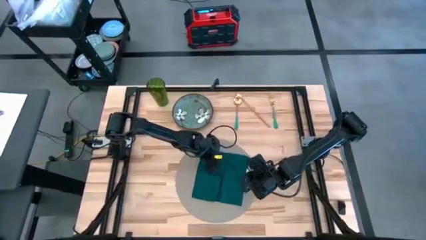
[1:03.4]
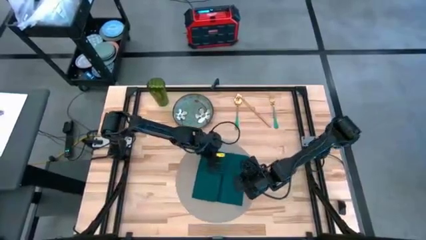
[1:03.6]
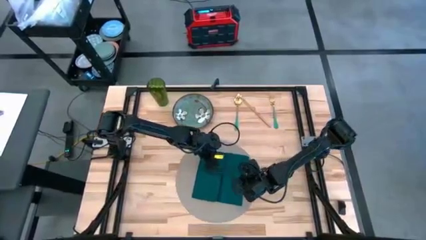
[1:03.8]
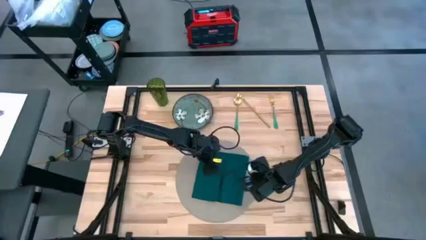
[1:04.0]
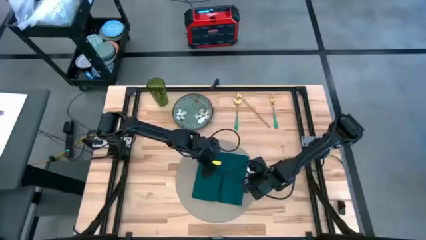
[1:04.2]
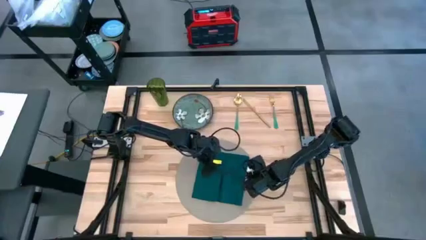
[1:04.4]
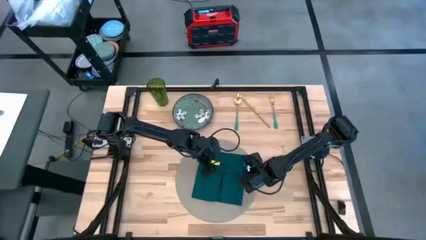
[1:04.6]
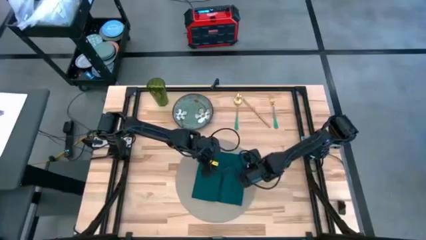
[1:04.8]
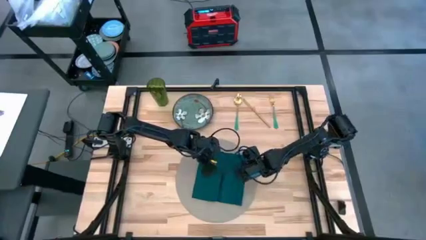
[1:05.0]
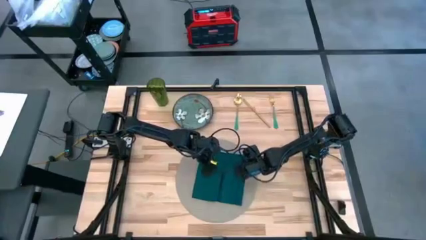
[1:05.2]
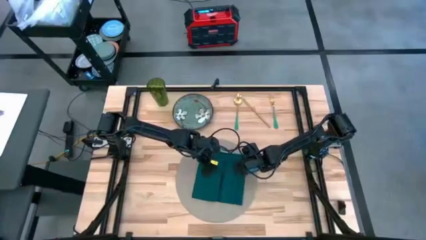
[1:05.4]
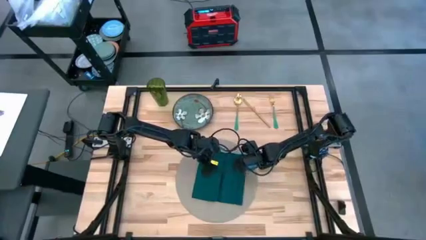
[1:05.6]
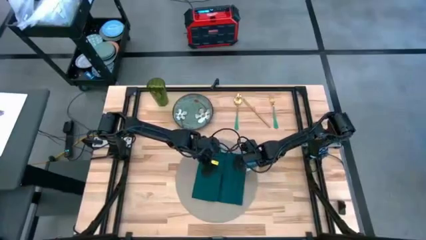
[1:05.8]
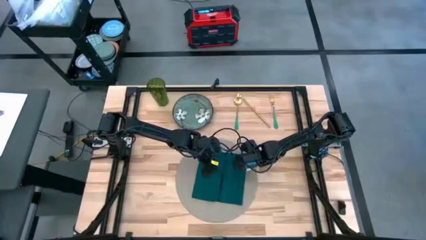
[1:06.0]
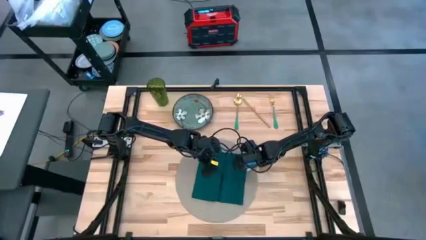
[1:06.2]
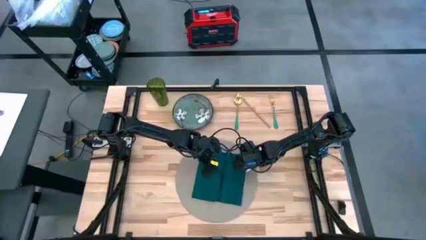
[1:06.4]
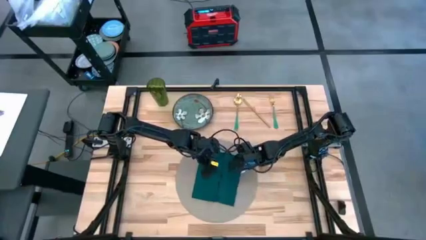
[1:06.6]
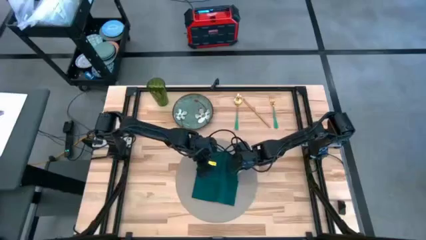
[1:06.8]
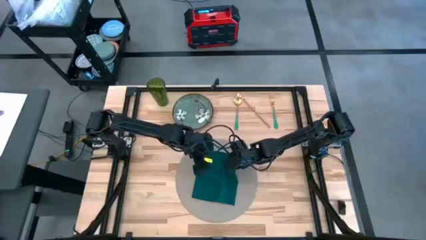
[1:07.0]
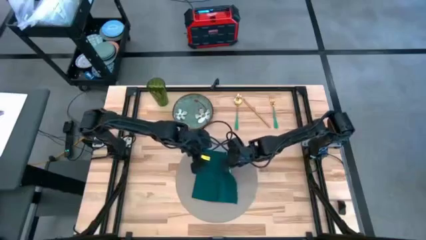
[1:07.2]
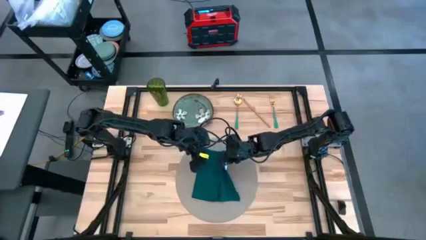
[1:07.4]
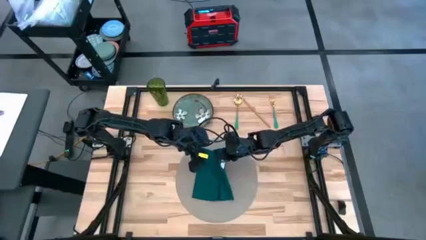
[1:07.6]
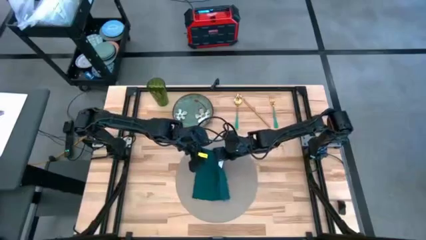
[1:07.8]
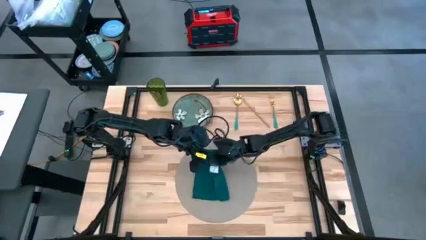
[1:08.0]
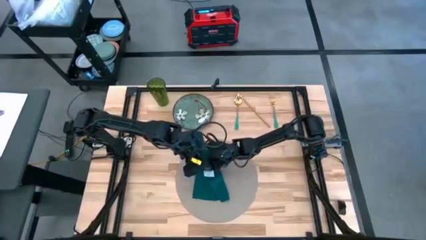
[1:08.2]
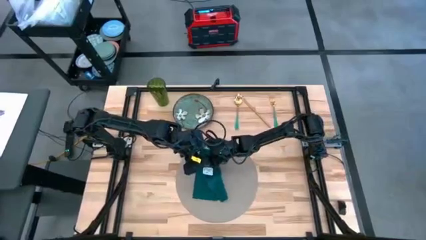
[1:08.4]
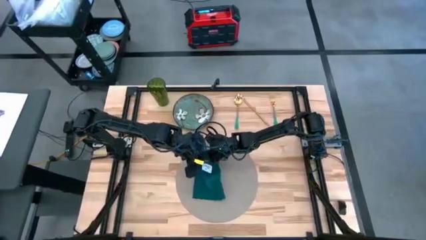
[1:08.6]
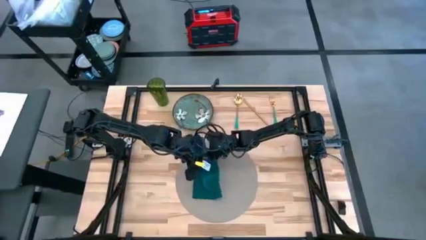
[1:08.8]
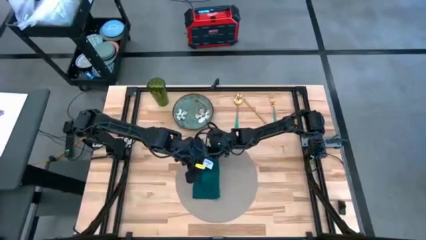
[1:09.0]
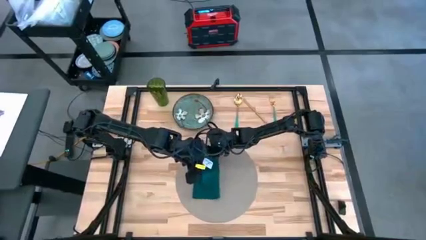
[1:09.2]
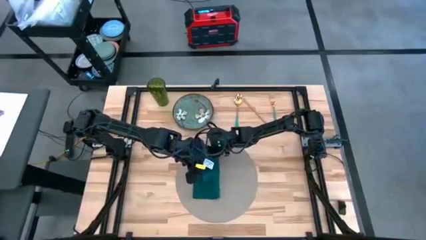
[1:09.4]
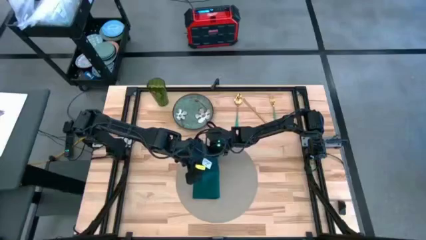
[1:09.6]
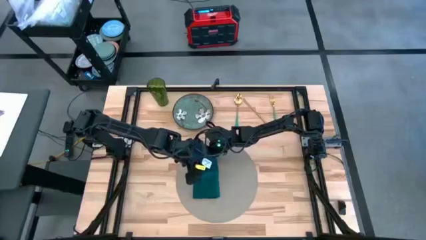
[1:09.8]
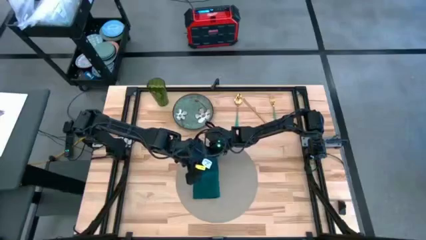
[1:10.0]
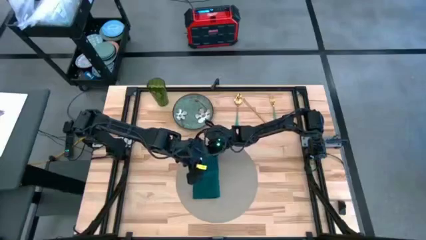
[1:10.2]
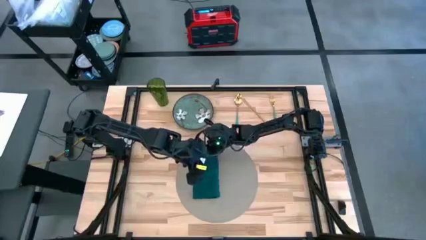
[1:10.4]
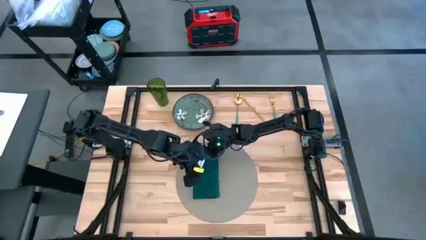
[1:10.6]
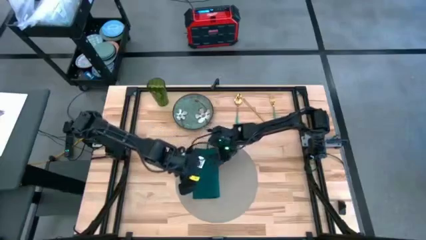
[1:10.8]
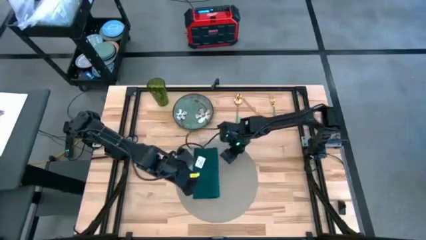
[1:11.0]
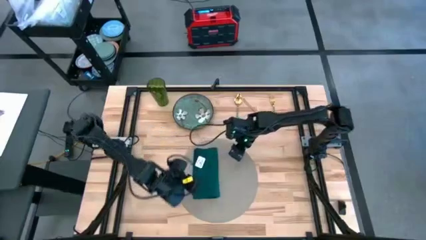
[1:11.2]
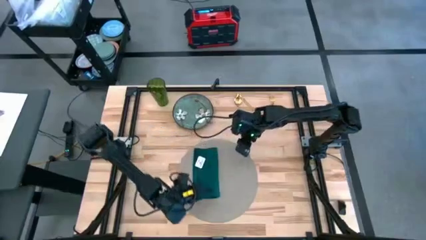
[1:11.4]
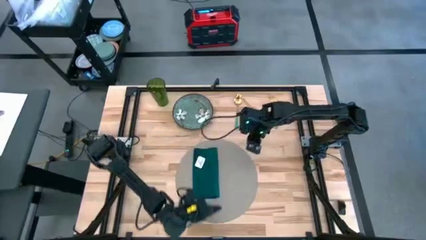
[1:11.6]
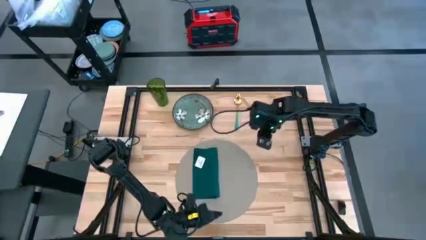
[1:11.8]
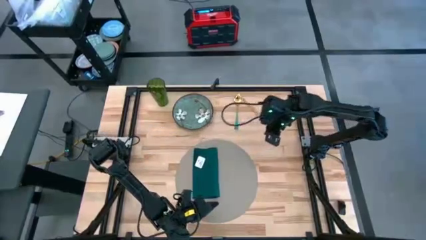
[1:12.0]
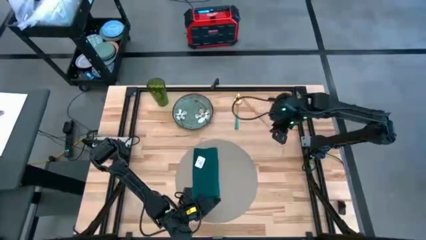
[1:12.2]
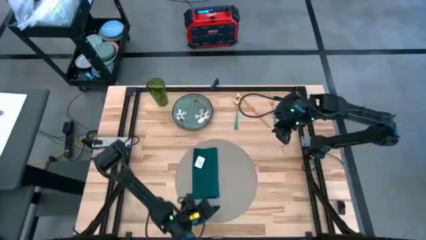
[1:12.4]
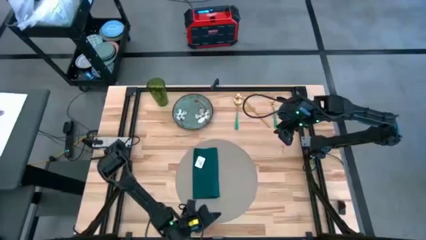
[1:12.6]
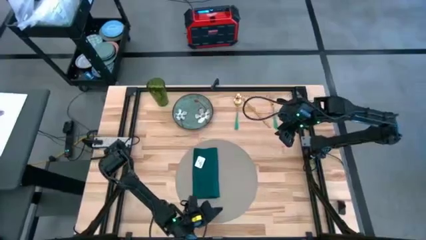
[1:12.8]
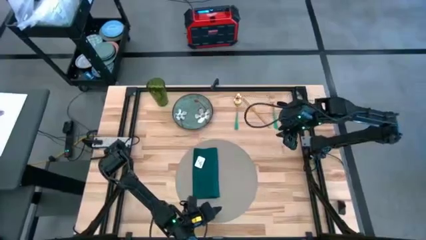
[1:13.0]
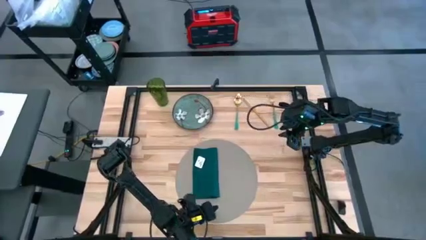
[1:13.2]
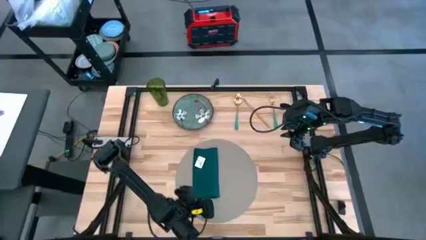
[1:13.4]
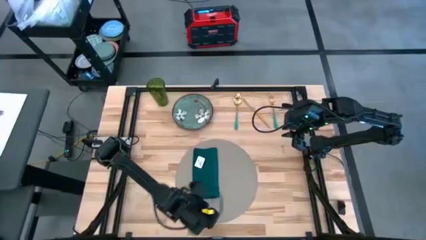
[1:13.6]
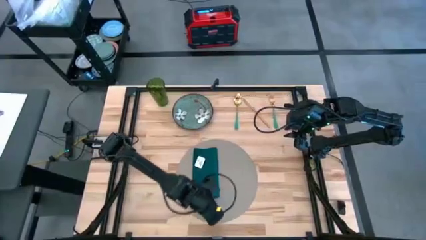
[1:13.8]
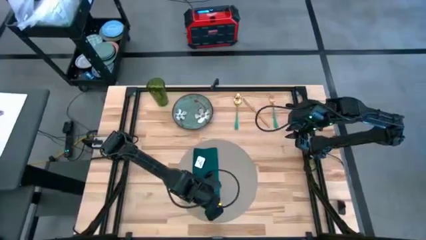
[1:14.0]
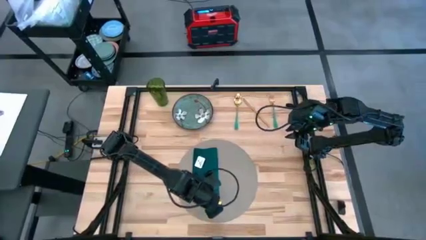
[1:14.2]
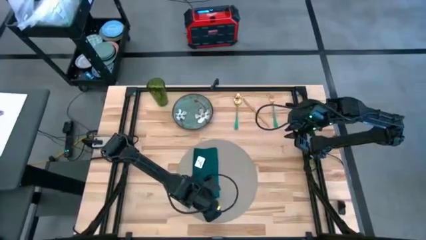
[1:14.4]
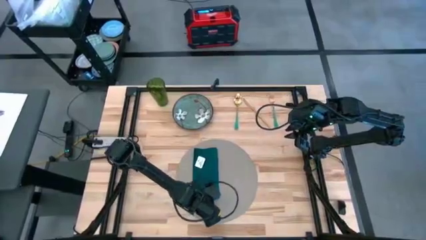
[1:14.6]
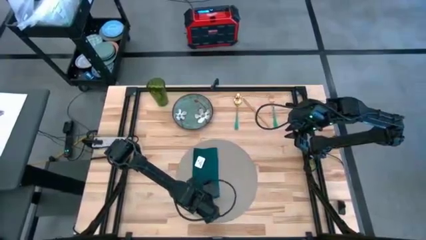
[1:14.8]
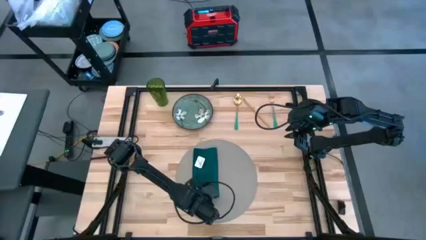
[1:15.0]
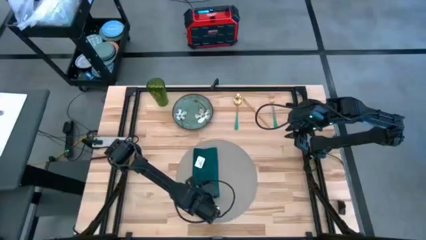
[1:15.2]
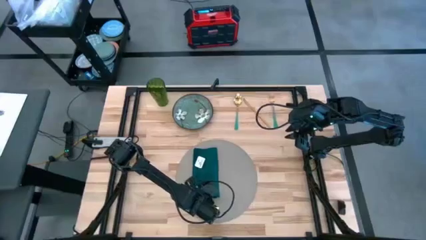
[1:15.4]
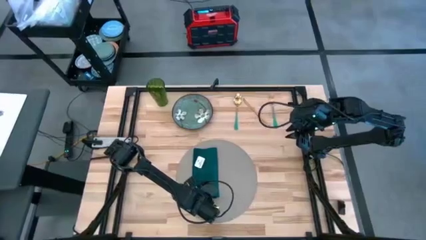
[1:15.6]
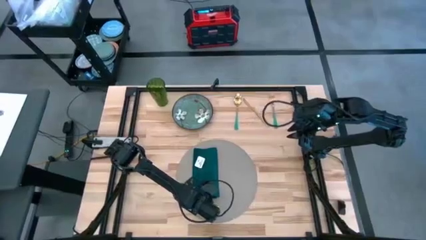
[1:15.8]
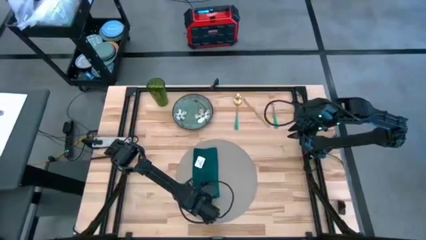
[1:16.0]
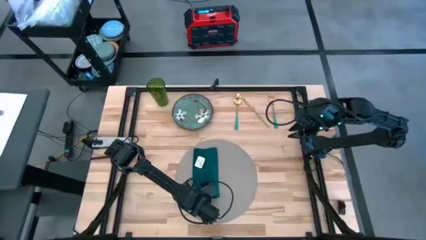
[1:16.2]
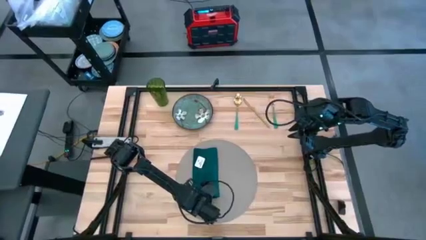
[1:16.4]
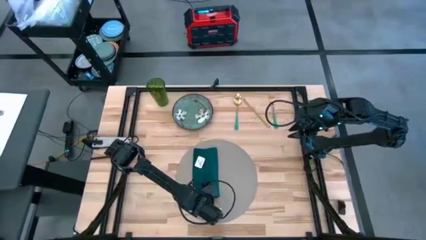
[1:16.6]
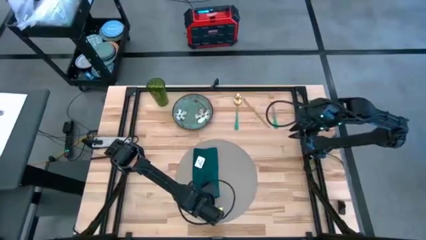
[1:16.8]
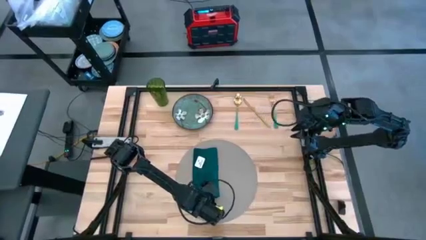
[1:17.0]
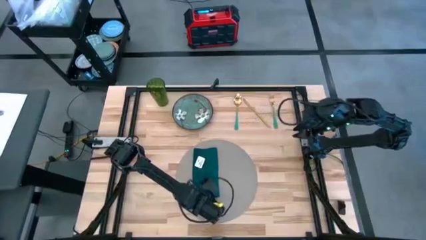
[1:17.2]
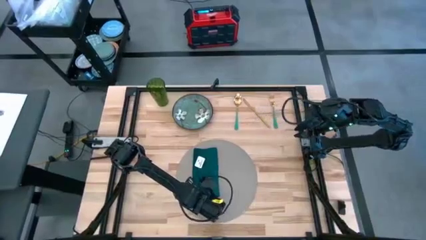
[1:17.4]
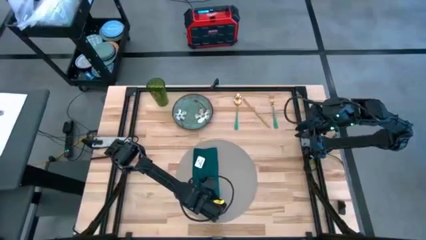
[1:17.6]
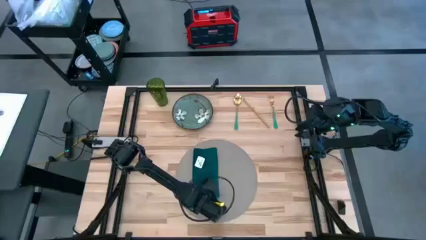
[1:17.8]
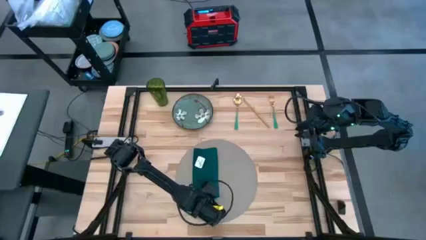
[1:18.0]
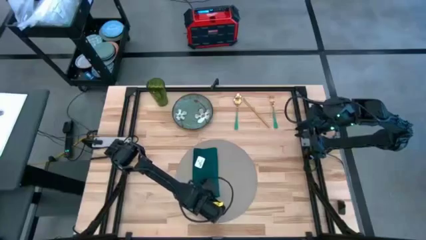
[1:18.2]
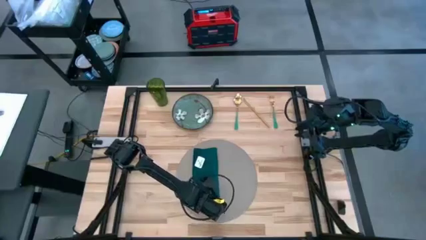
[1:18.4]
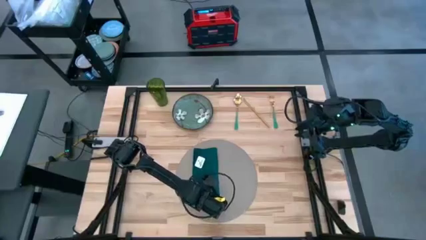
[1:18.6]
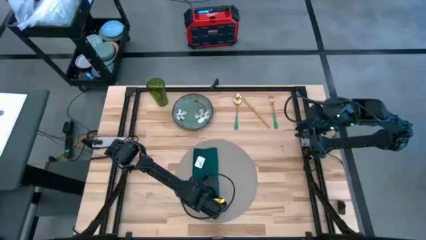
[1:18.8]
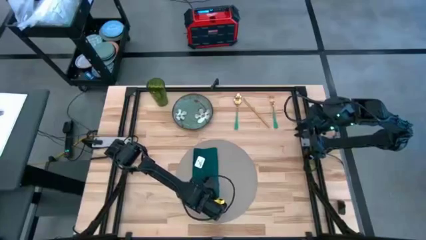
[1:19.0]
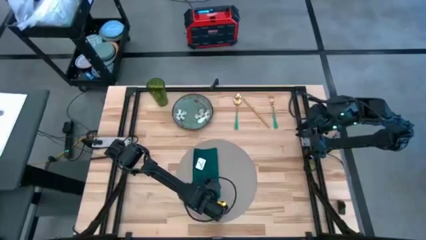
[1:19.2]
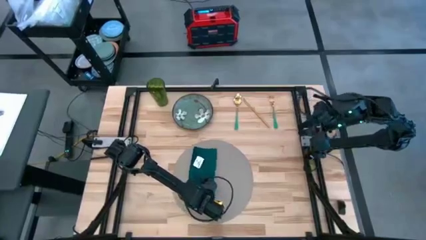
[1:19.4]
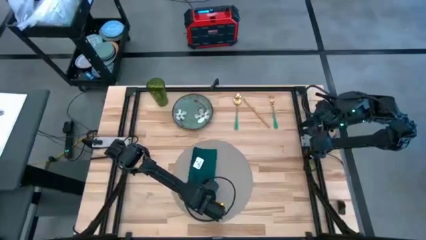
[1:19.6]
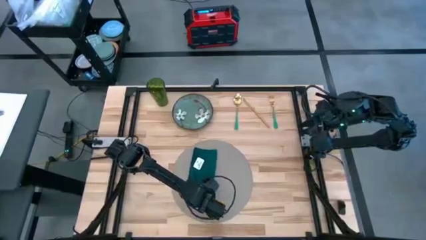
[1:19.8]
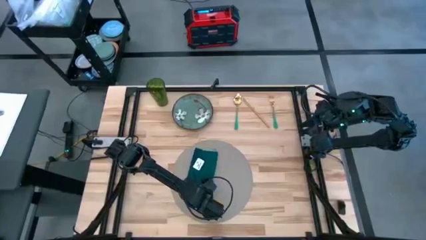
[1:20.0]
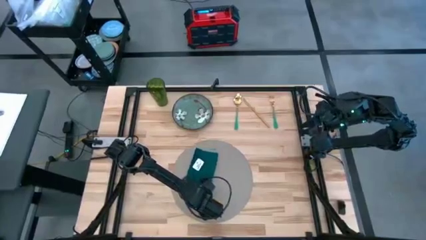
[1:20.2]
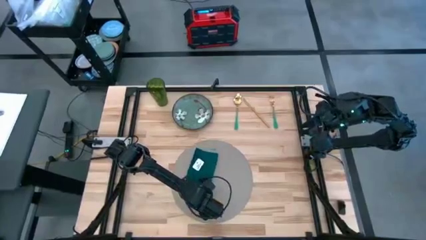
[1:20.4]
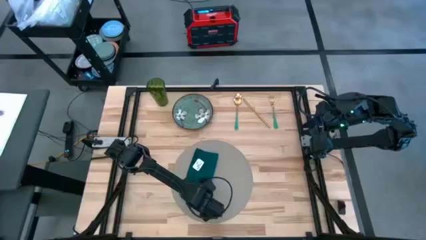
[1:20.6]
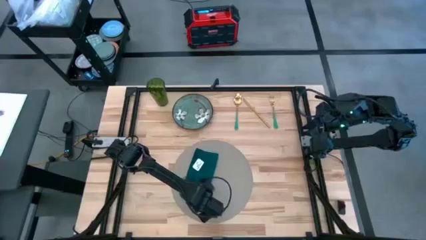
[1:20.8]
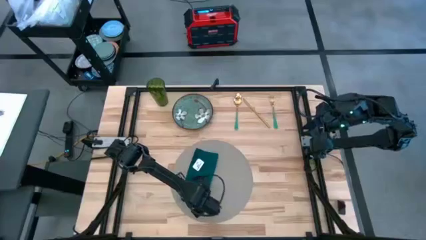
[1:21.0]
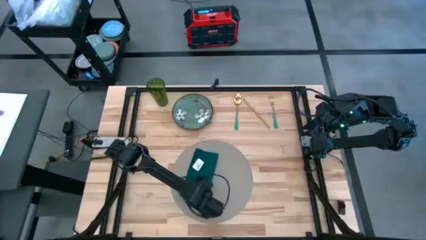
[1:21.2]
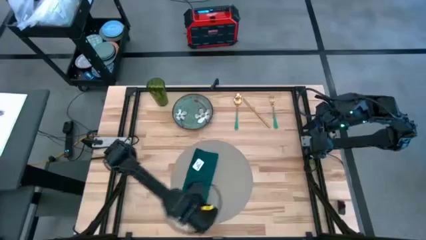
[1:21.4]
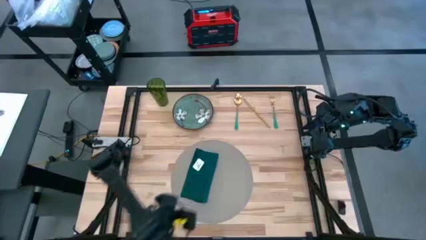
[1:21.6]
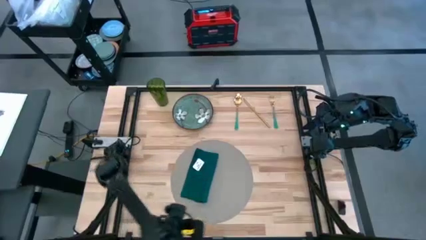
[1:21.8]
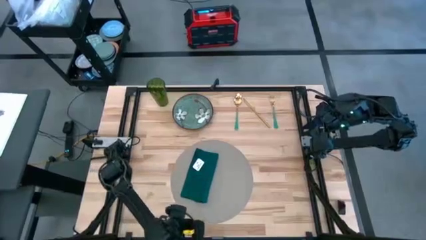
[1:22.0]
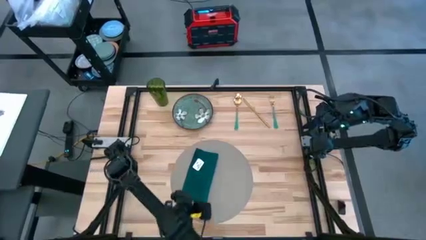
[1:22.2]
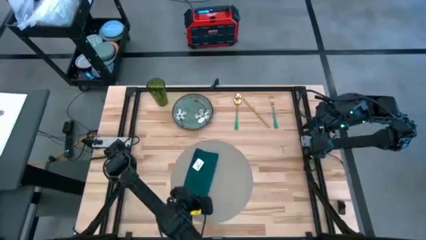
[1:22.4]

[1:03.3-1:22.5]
Task: Set table place
Fold the green napkin
